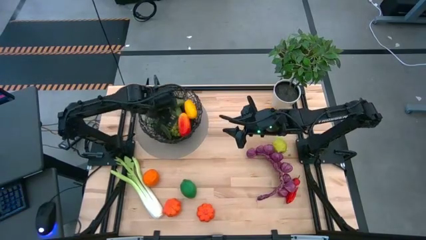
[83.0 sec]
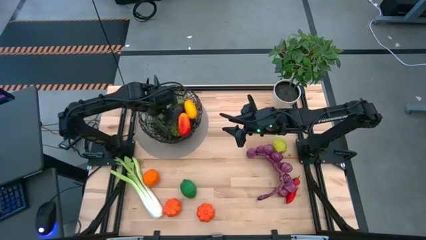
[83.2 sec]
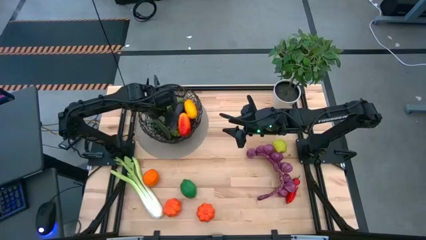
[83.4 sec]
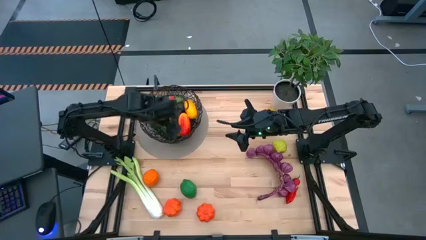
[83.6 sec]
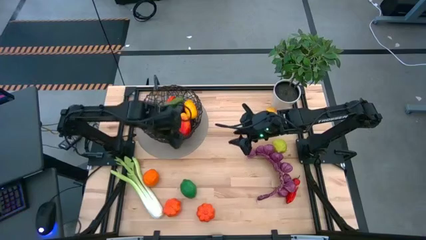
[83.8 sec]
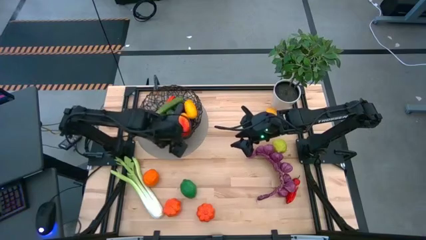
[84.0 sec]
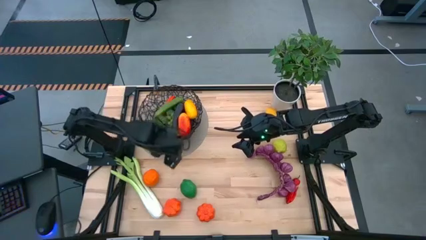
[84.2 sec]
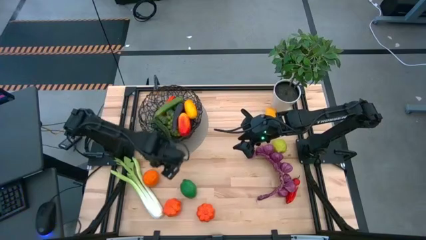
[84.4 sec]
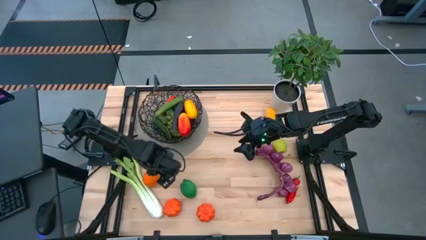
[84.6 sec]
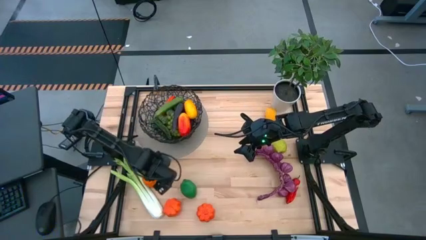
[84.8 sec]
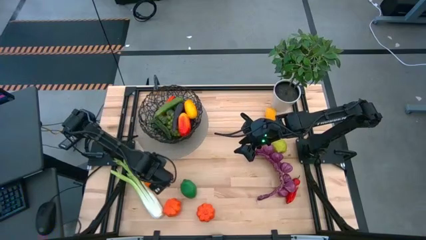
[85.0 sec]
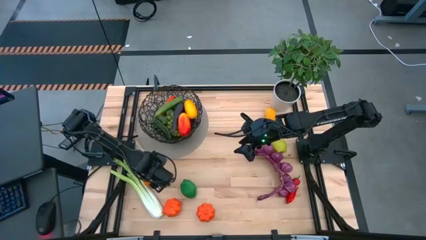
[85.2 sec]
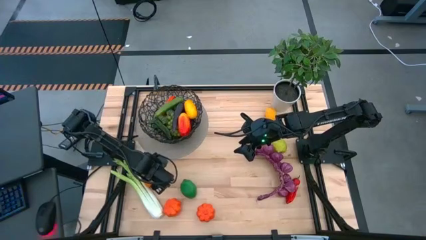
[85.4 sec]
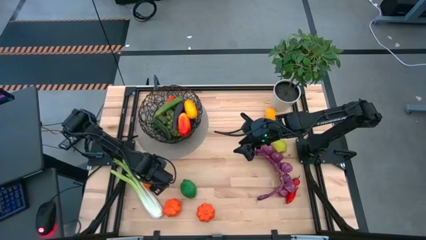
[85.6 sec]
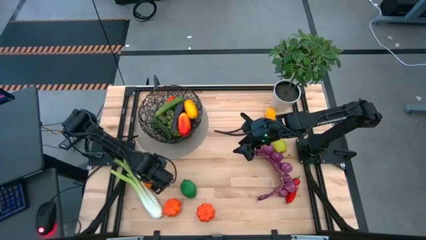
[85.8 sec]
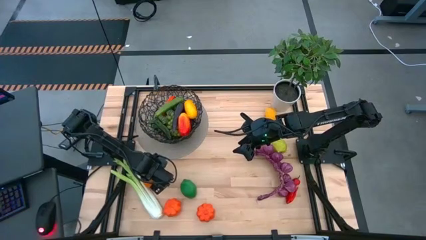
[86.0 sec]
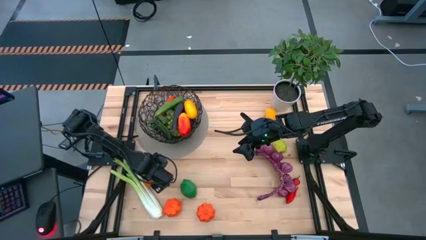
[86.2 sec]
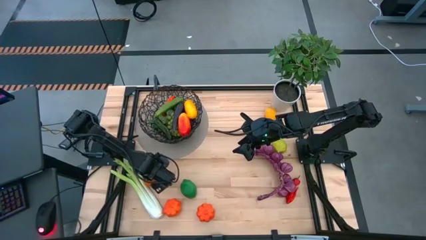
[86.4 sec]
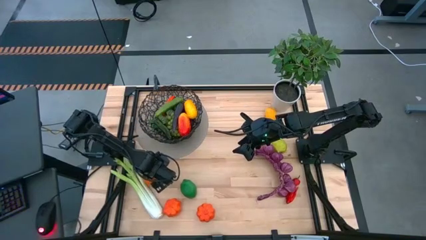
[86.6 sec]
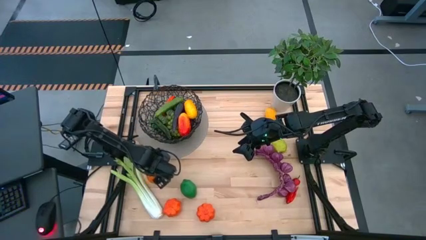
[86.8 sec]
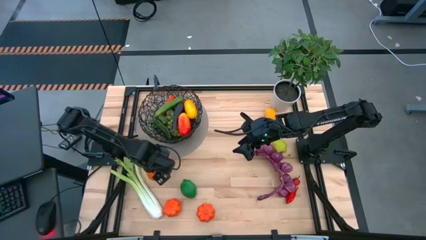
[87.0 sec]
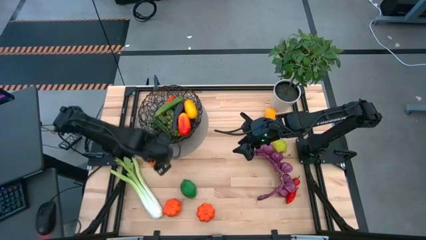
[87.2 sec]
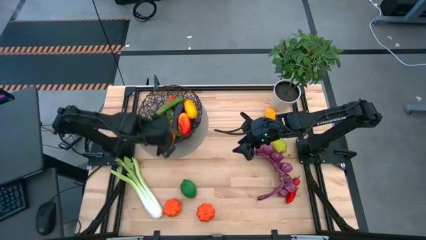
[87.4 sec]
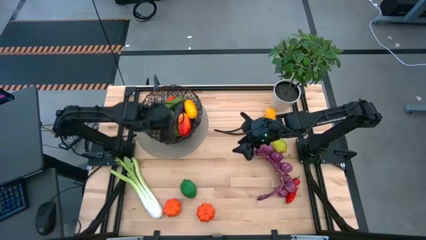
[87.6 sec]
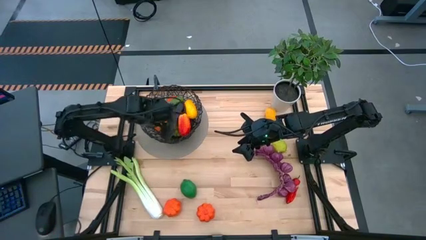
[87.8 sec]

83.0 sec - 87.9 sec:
Task: Build produce basket
Put the orange into the black wire basket

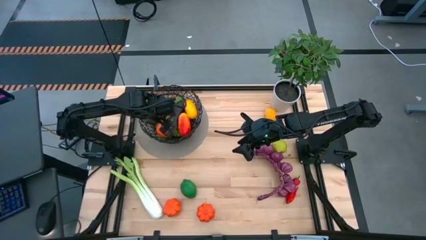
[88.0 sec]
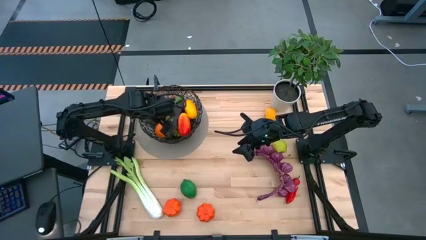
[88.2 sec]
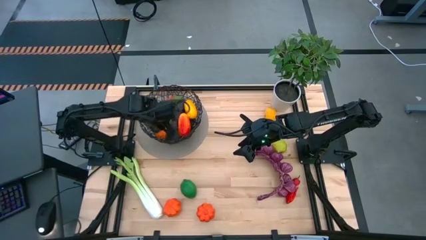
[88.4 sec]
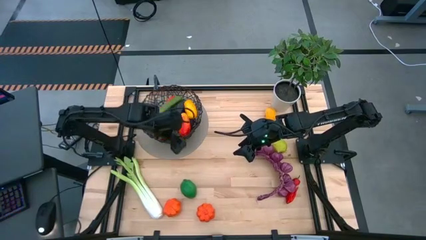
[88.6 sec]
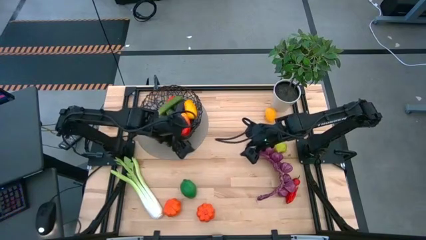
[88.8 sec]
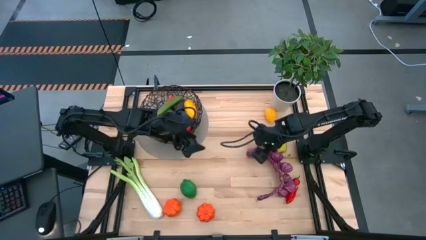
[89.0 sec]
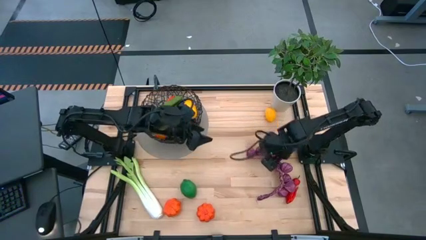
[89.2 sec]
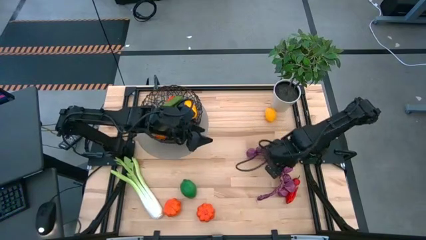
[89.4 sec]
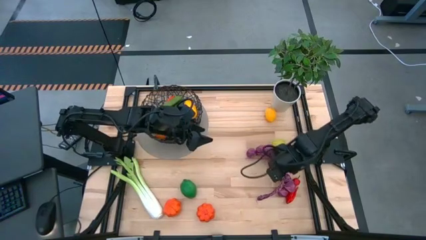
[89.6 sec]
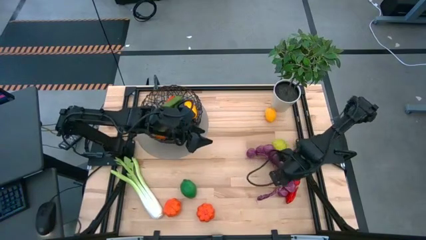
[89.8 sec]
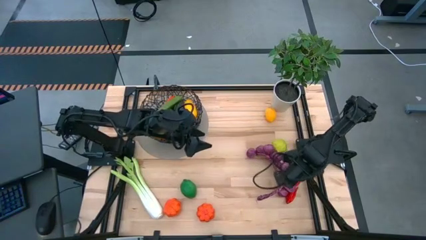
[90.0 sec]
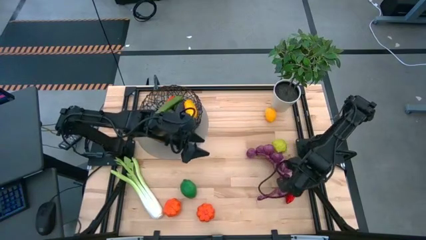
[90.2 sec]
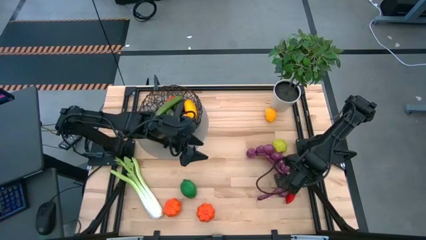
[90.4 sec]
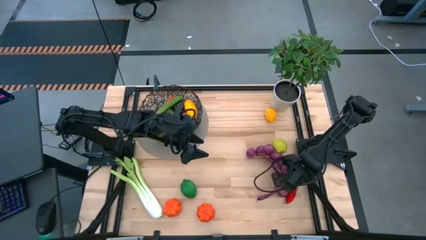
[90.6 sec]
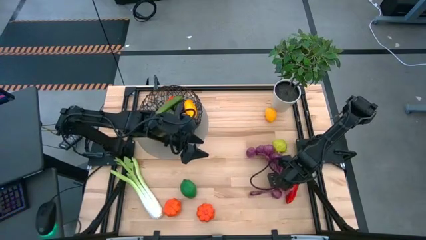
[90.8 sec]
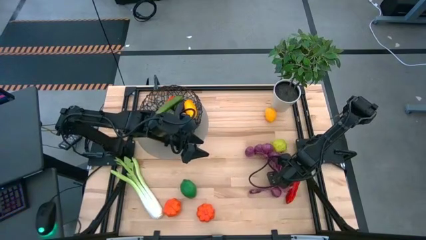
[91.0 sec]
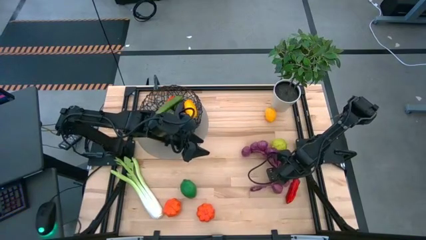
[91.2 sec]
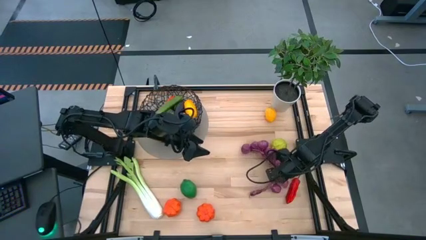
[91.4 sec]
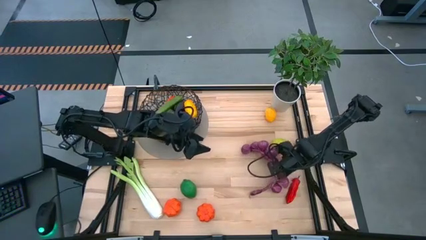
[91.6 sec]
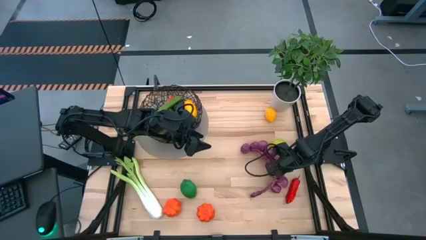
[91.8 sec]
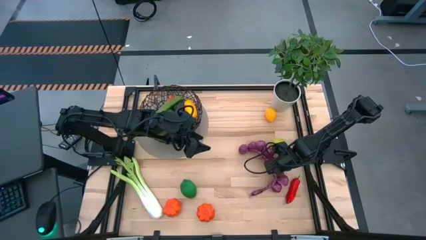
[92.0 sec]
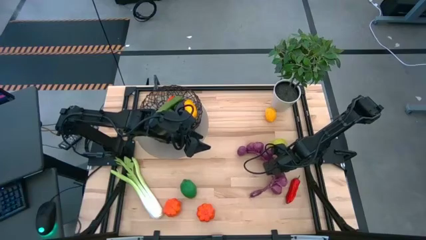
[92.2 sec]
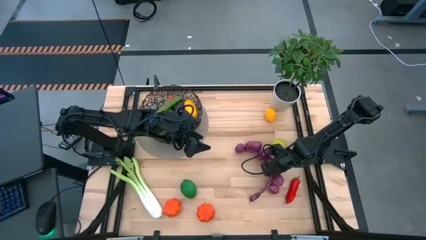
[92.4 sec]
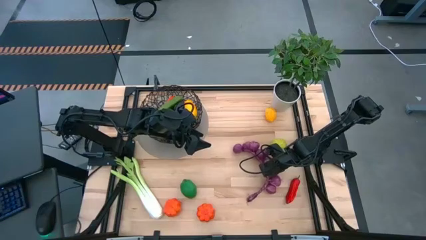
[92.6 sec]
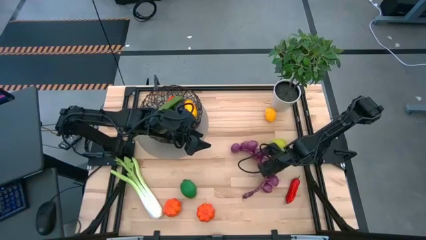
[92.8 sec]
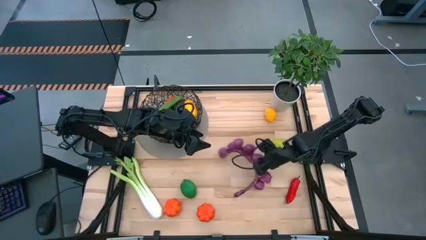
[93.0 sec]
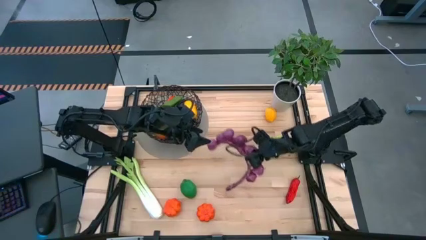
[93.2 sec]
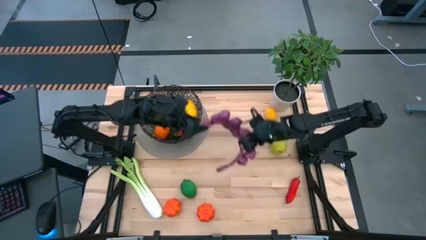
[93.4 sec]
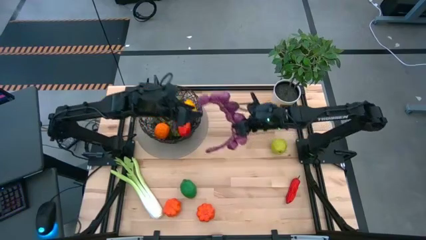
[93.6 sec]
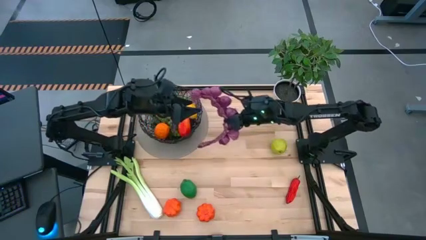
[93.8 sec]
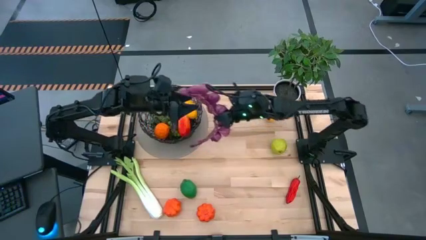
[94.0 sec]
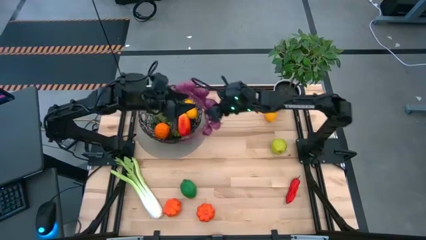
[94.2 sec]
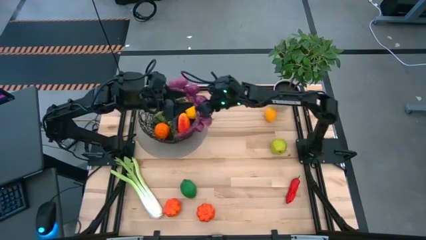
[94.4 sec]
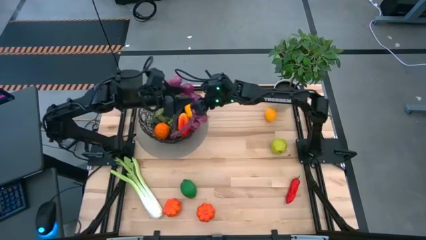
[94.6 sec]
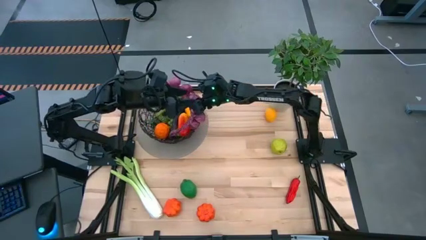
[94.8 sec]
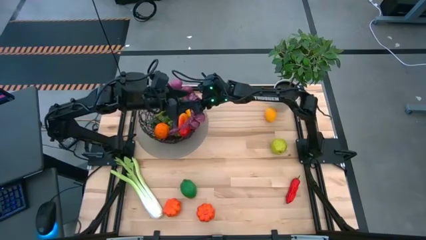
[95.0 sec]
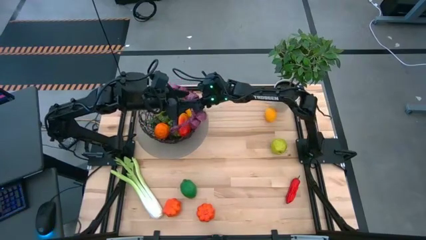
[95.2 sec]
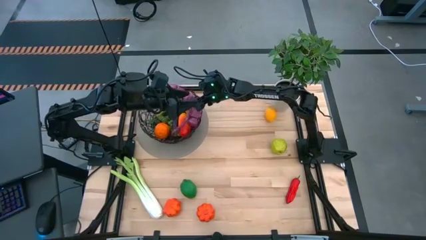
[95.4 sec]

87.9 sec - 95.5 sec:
Put the purple garlic into the black wire basket

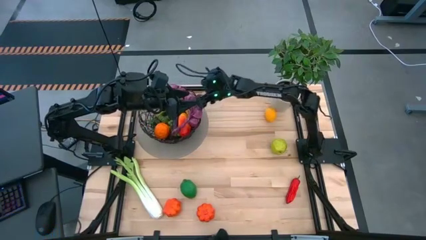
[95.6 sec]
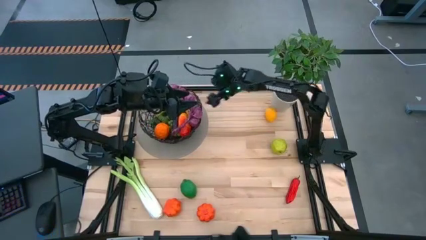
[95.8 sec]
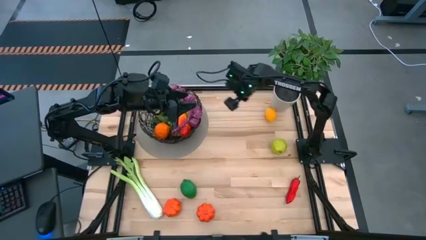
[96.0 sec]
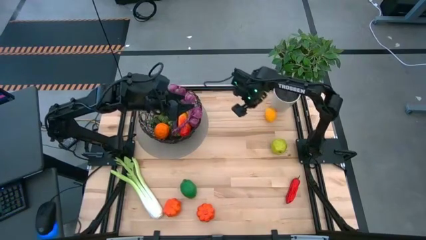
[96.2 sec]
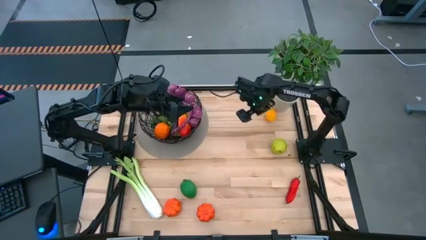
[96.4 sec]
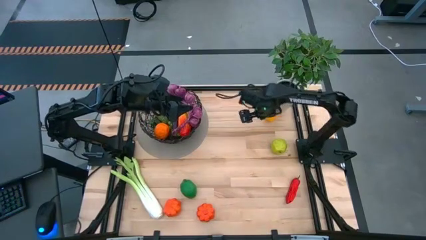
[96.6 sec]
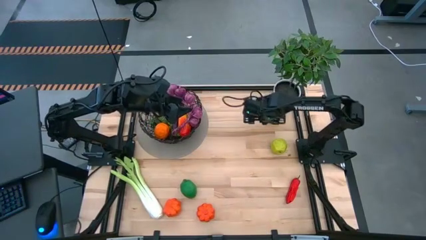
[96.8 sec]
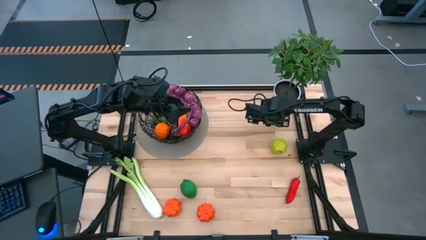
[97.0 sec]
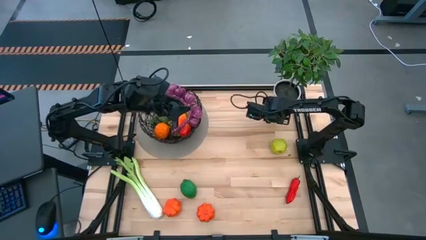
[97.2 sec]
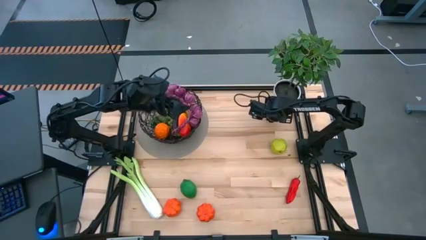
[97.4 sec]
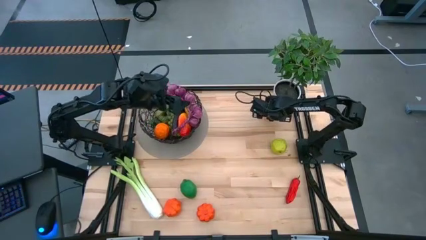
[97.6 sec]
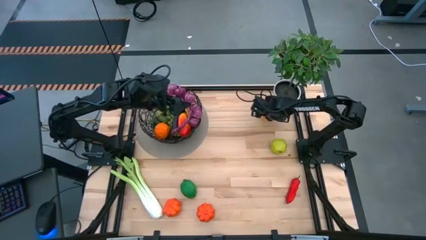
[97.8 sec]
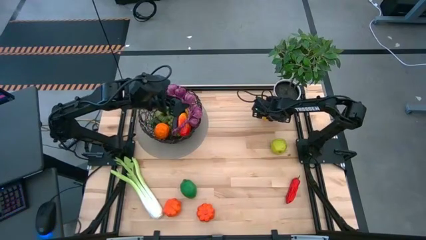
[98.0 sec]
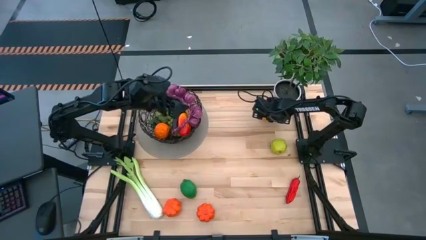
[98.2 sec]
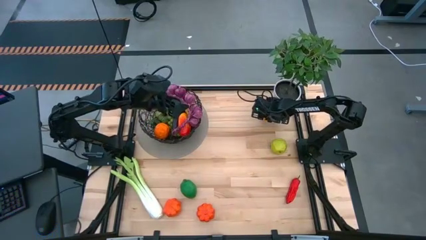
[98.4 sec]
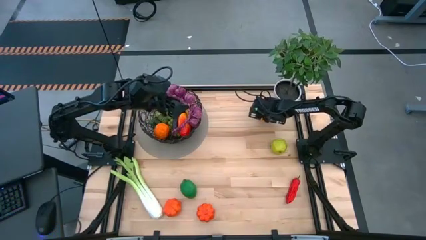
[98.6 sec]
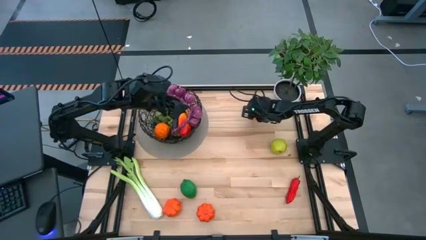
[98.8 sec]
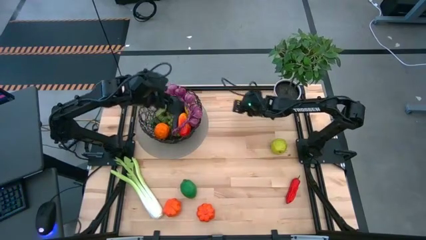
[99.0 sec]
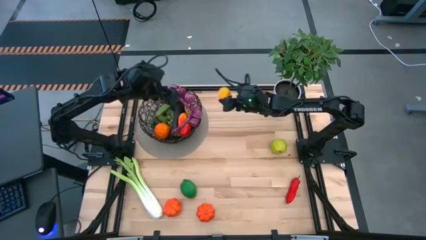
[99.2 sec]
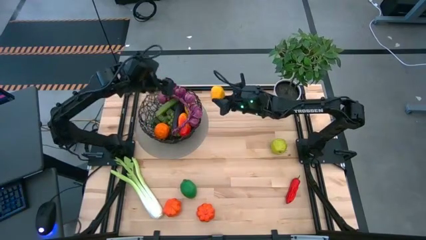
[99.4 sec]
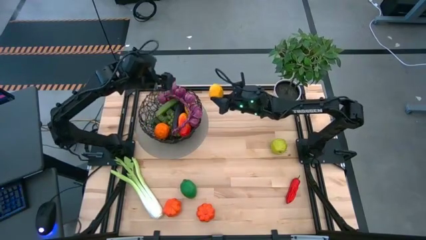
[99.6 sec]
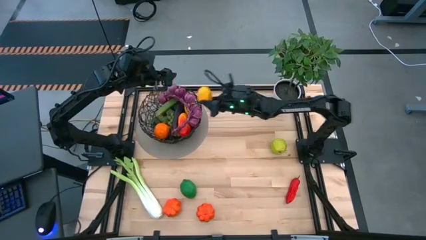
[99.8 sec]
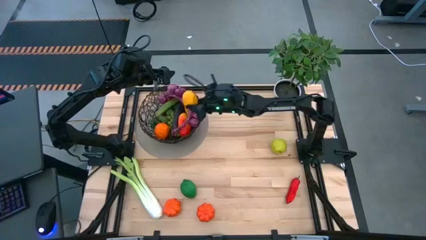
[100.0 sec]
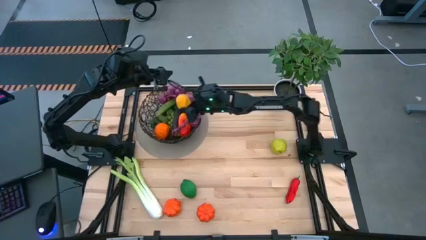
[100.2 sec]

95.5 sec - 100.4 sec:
Put the yellow lemon into the black wire basket
